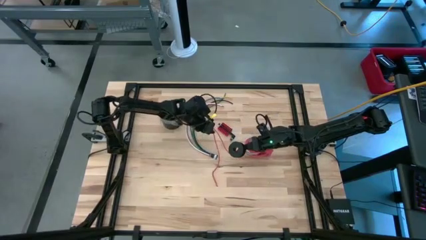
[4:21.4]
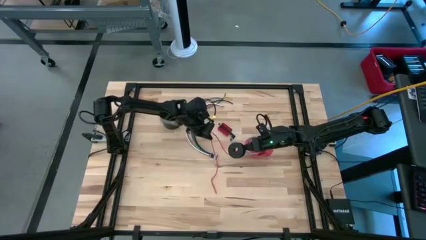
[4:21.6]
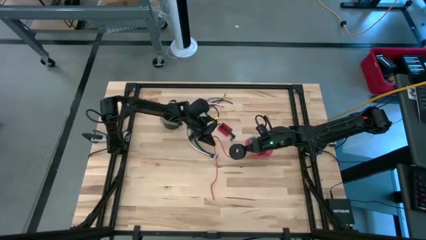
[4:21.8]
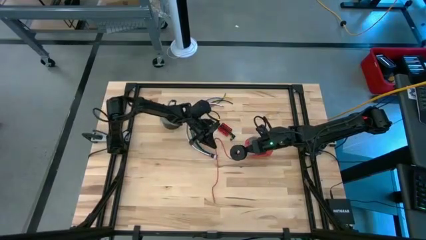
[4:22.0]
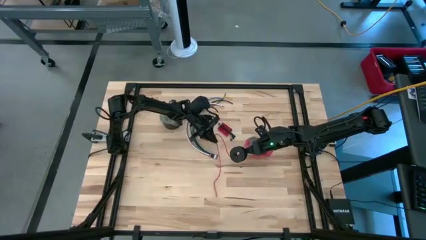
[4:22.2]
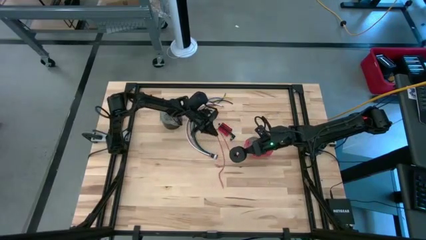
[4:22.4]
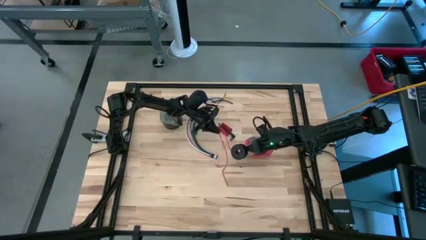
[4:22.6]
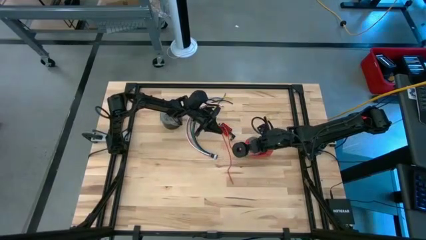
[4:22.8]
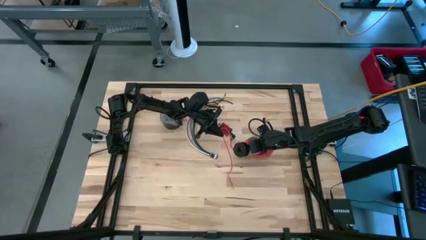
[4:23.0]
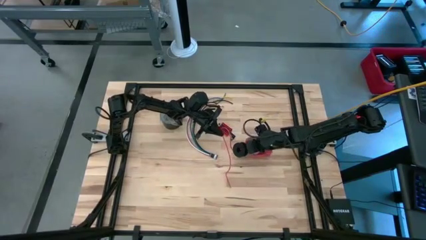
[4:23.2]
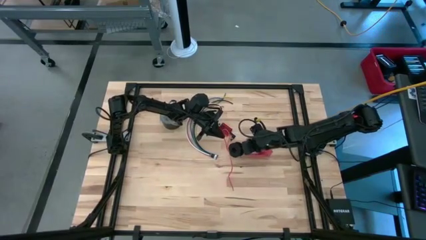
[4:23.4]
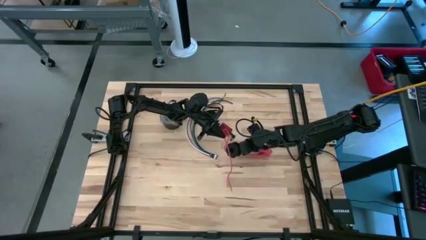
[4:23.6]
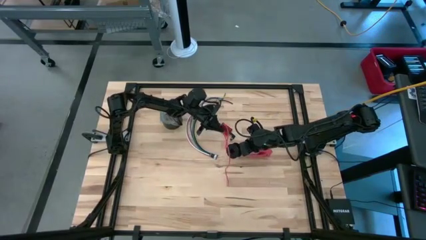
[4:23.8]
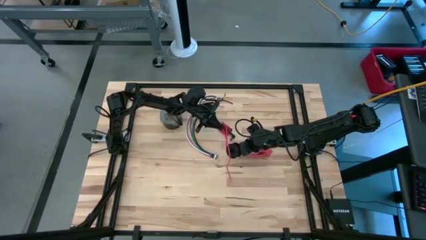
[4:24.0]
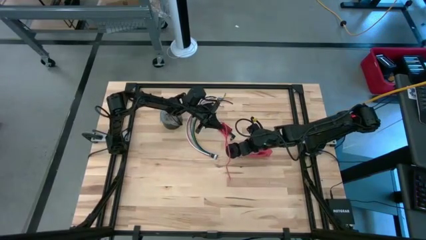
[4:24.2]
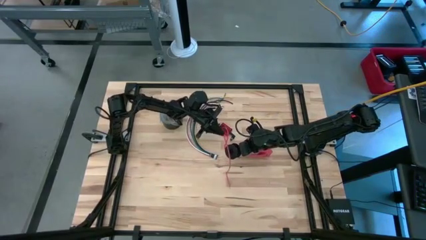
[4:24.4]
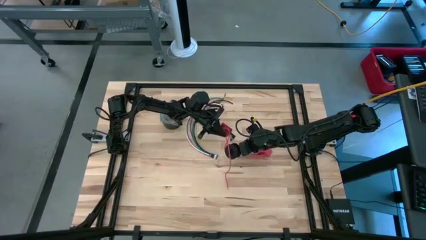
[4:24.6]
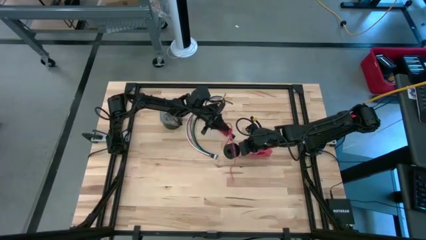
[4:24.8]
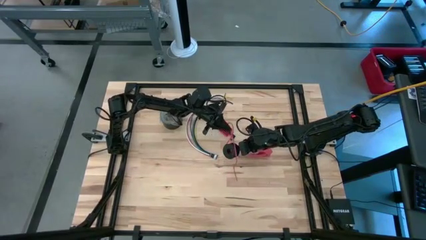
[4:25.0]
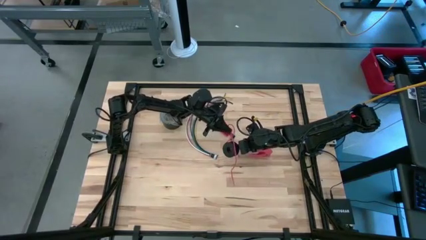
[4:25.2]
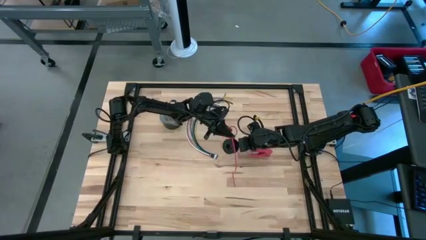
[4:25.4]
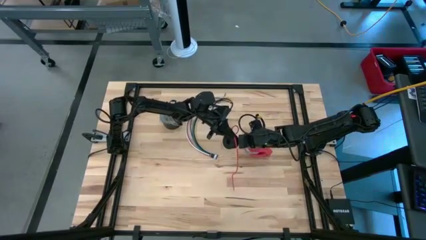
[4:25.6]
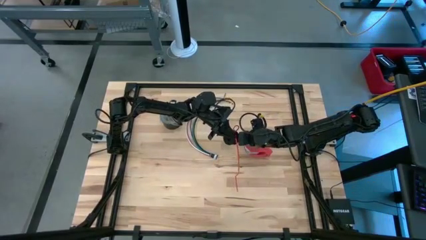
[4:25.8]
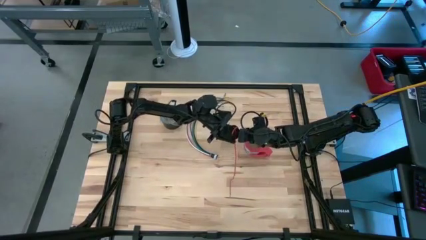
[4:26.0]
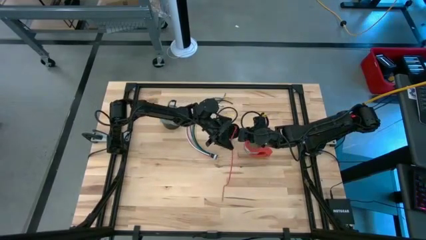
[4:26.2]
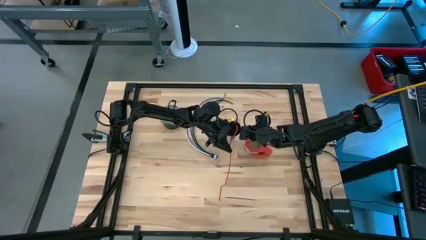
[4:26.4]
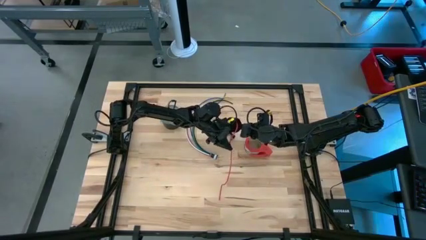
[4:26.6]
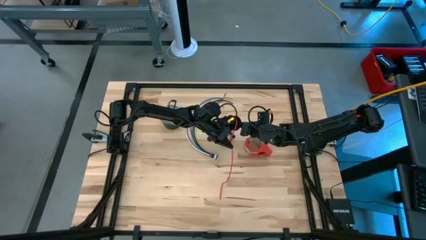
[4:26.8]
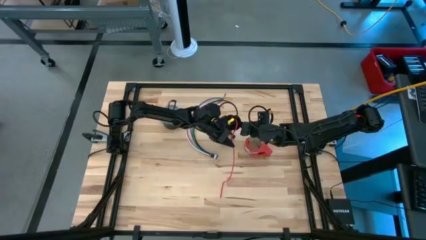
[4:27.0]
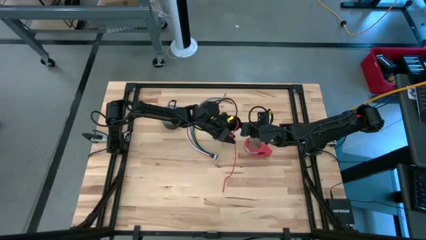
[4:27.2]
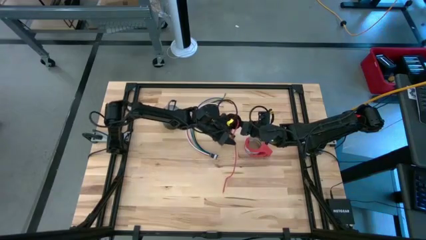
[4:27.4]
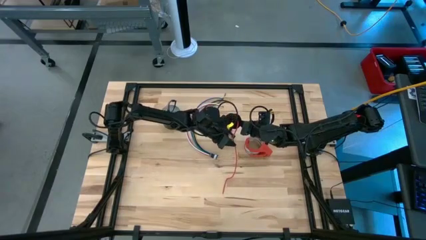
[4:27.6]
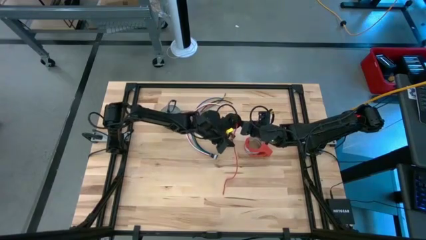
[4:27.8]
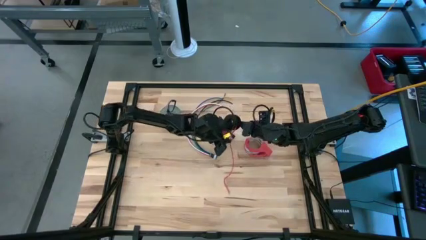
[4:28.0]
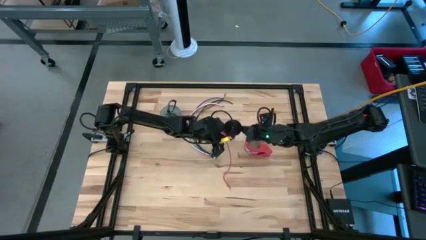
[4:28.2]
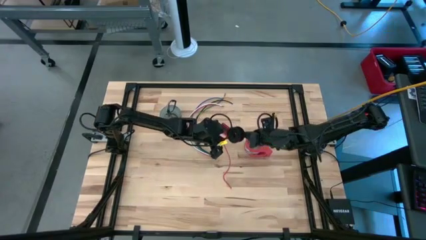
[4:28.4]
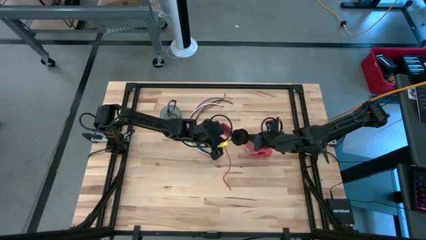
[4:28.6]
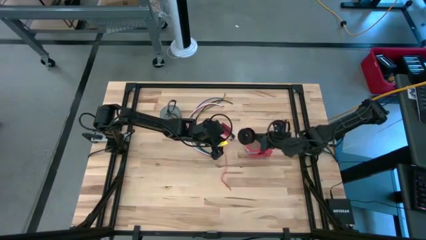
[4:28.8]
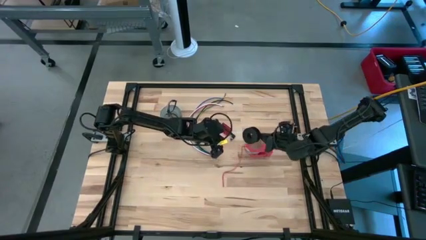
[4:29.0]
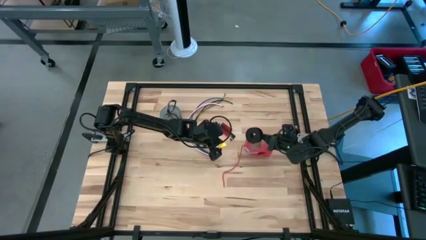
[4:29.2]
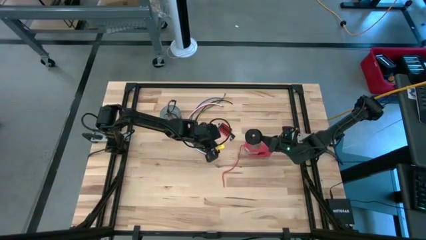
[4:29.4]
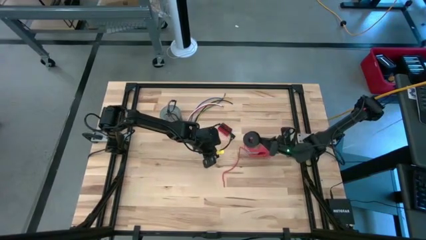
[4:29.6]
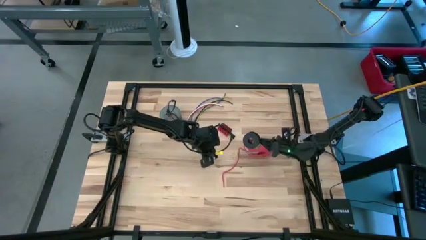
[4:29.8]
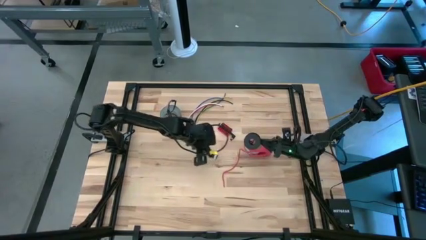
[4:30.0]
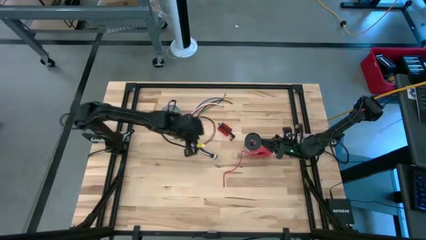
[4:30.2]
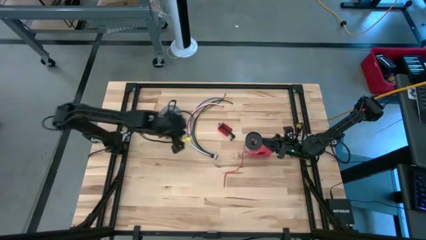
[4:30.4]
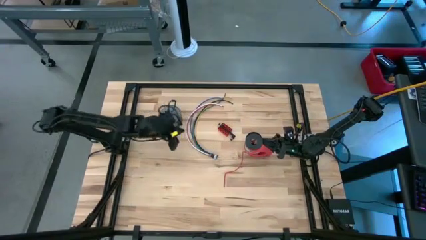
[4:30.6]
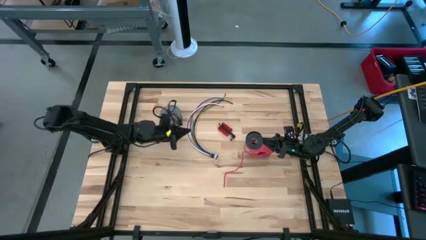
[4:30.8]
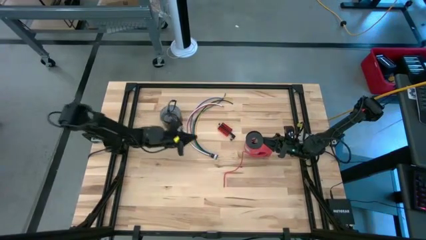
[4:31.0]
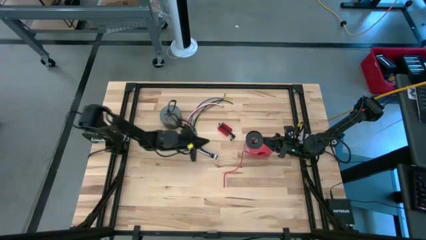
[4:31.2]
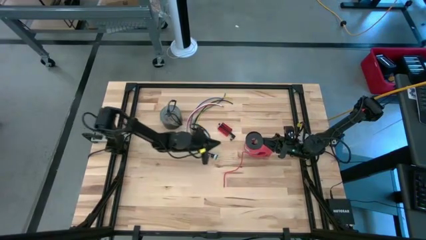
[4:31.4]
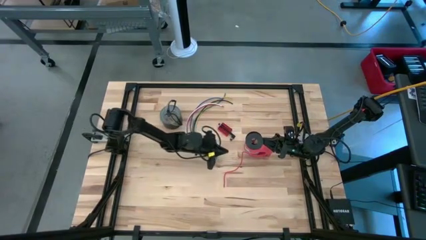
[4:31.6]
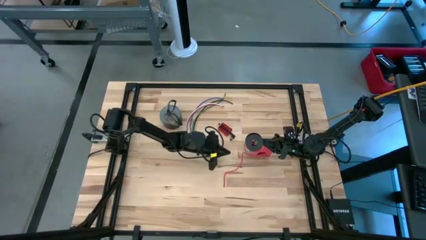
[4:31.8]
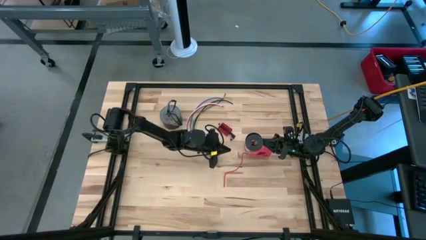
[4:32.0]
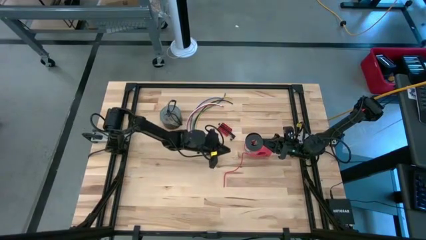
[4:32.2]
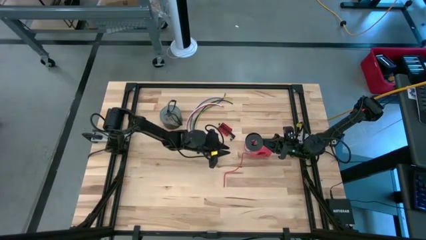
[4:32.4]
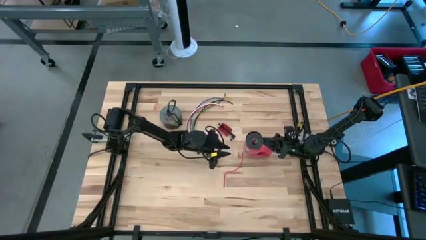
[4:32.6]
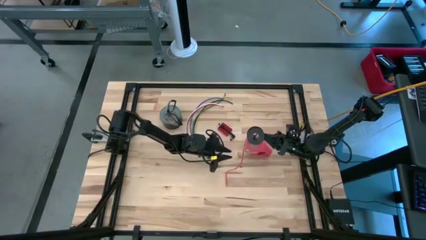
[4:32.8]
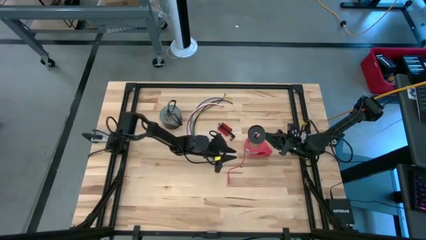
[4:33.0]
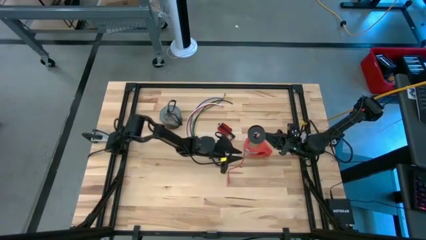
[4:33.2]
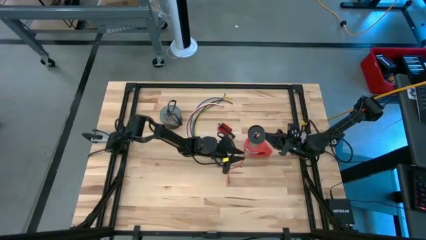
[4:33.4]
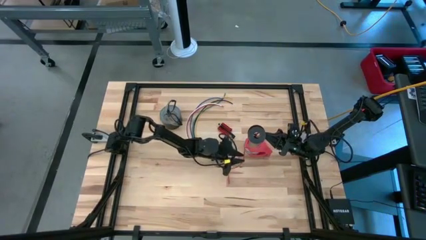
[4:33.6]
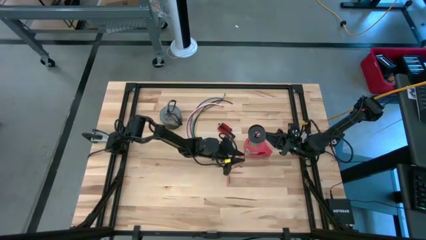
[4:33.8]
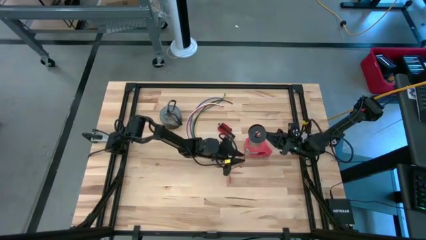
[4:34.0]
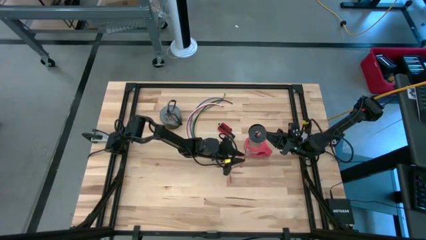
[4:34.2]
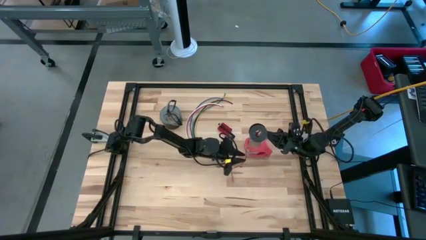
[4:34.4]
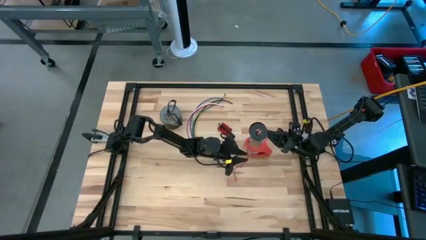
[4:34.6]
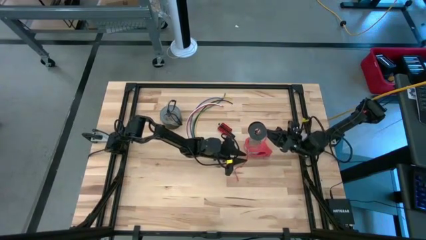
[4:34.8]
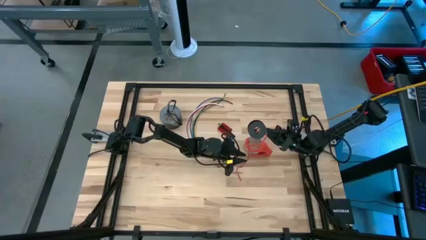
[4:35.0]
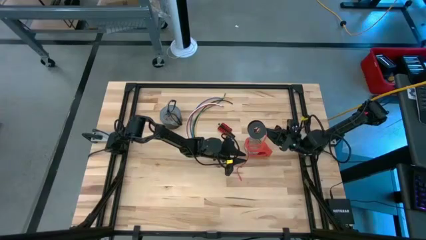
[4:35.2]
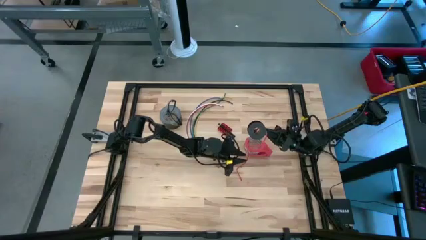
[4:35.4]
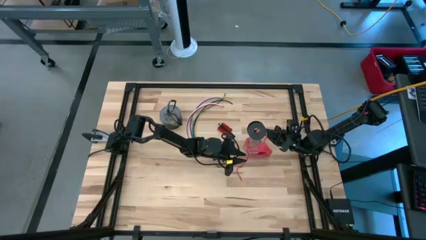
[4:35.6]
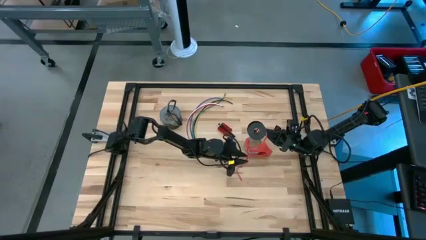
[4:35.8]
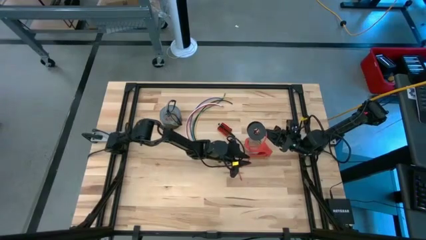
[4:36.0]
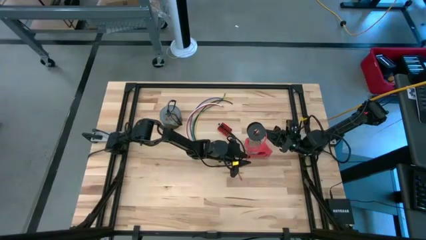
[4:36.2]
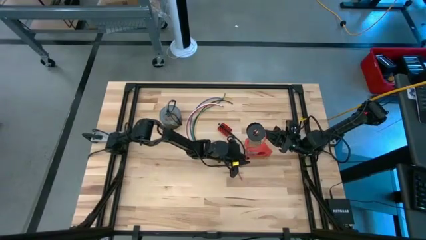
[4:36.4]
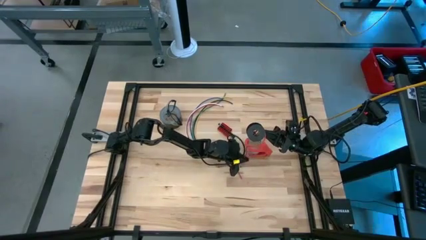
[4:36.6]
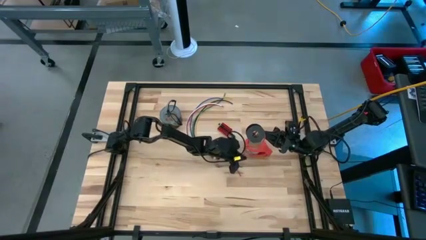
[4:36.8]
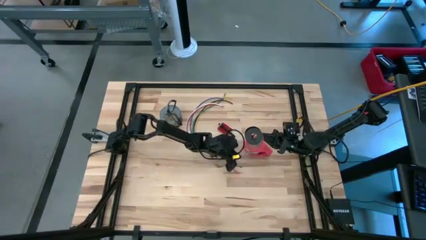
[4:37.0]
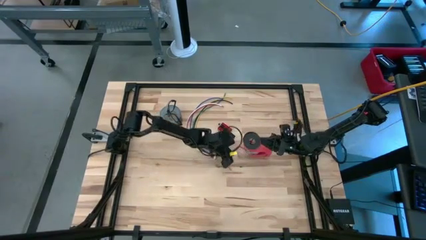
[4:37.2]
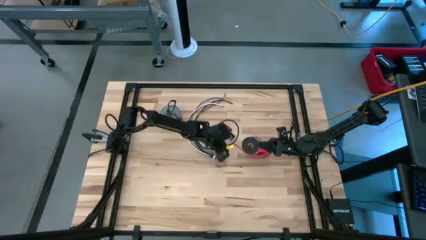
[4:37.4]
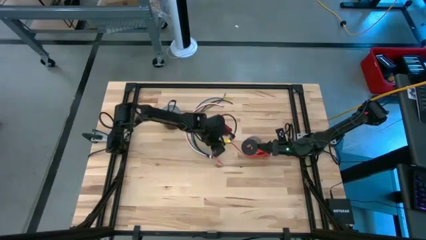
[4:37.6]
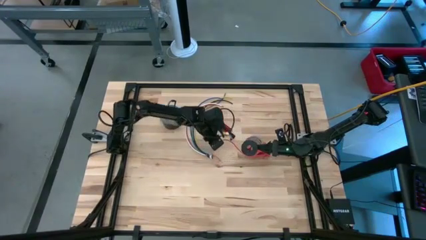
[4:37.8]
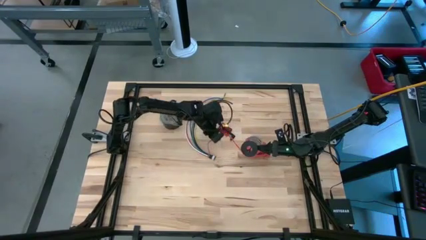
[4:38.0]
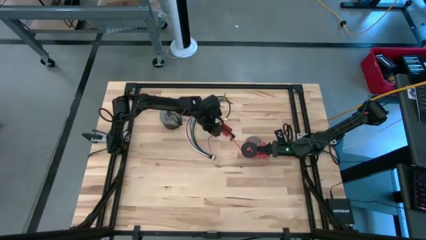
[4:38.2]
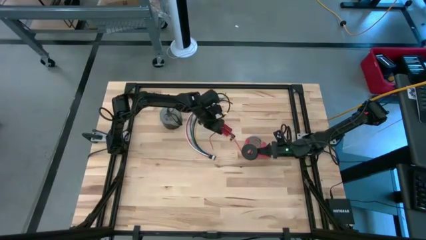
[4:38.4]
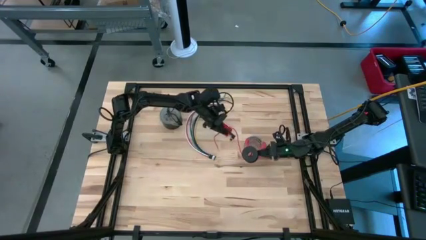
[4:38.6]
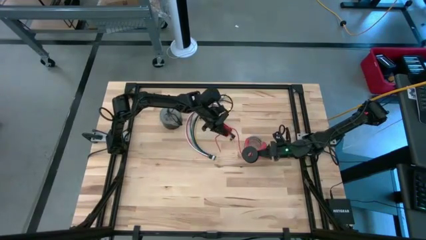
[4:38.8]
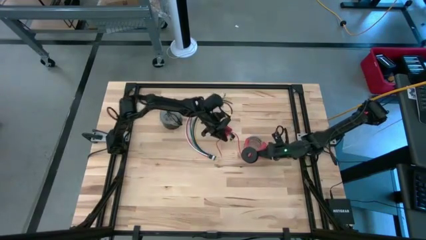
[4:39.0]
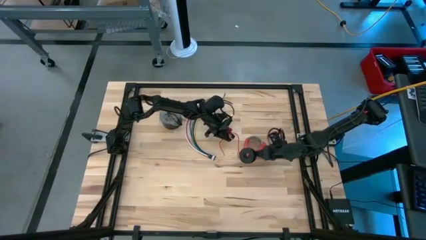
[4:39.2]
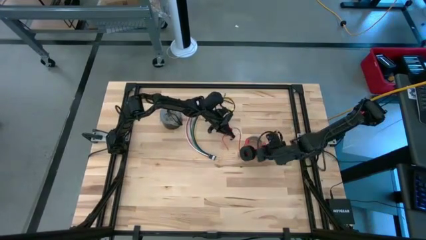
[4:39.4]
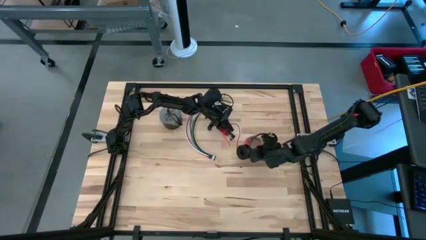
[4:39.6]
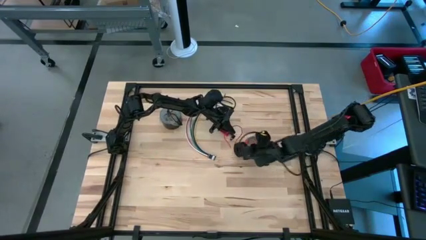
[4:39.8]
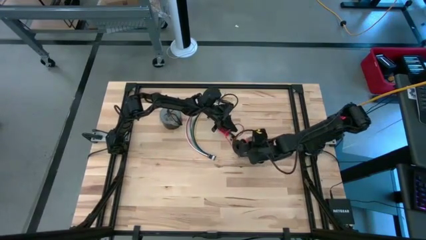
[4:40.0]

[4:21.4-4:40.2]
Task: Coil cords
Coil the red wire onto the spool
